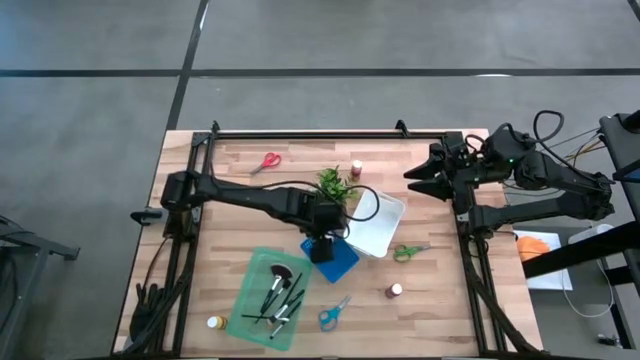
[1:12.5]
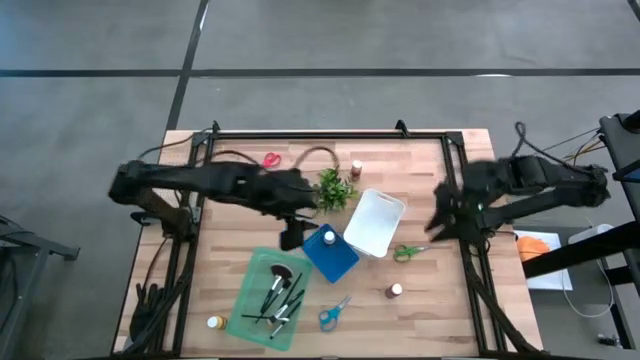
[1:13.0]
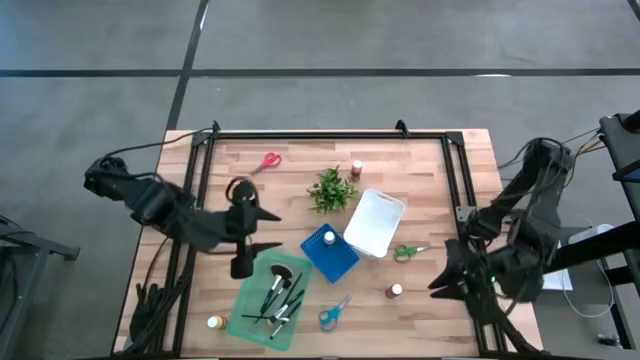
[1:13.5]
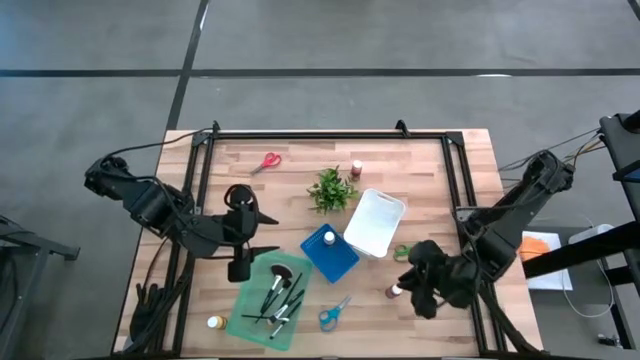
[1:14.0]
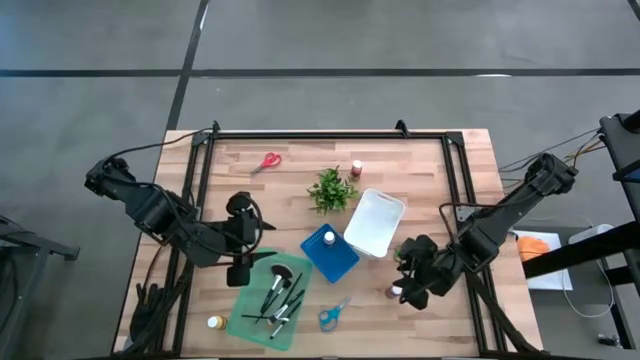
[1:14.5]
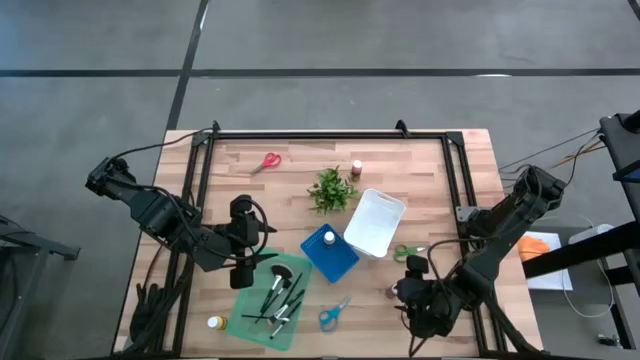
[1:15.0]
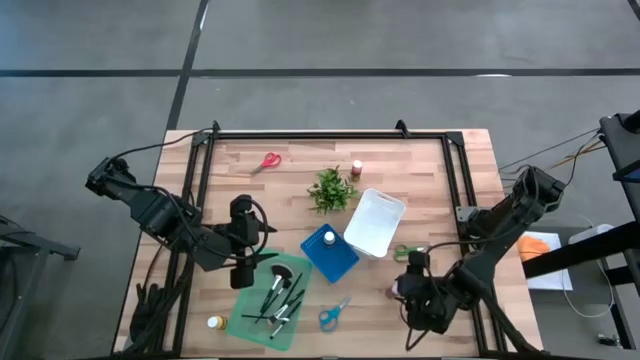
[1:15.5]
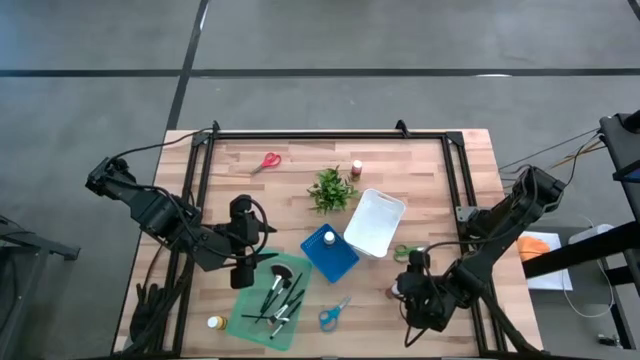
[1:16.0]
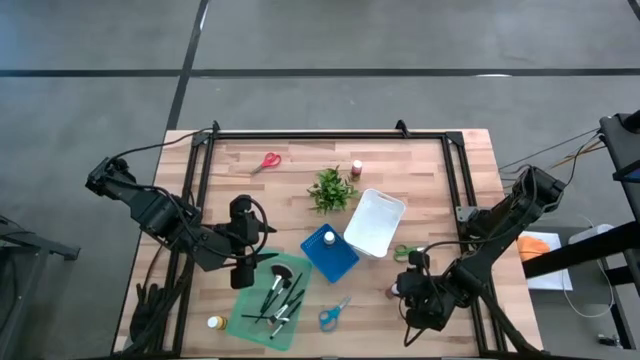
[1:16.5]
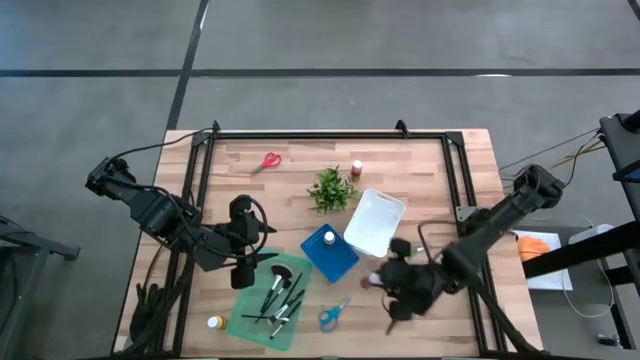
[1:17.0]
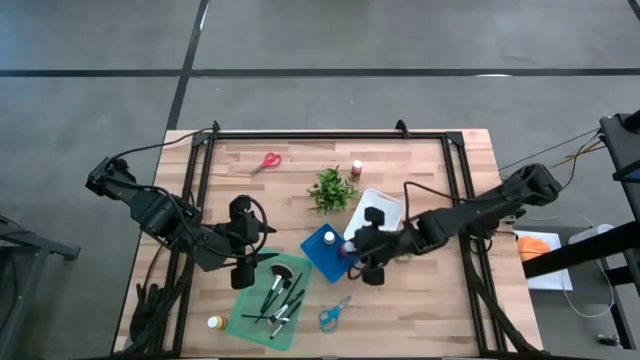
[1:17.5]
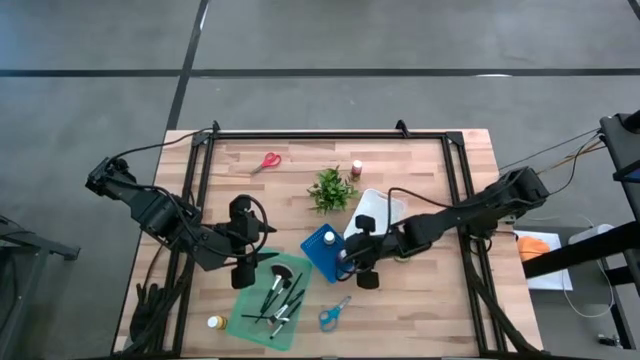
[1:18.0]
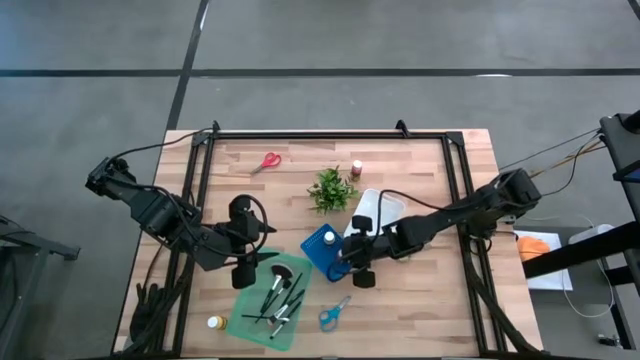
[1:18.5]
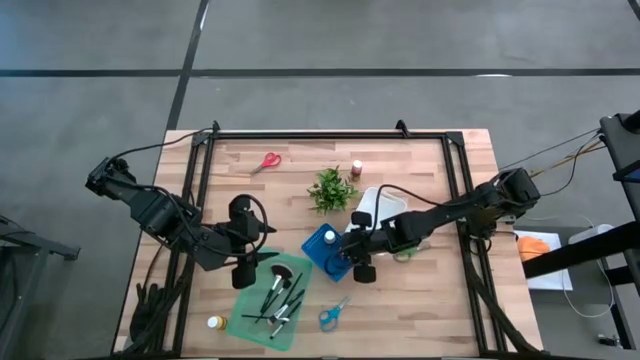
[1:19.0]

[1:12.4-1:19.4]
Task: Pick & Place Paint Supplies
Put the red paint bottle into the blue bin

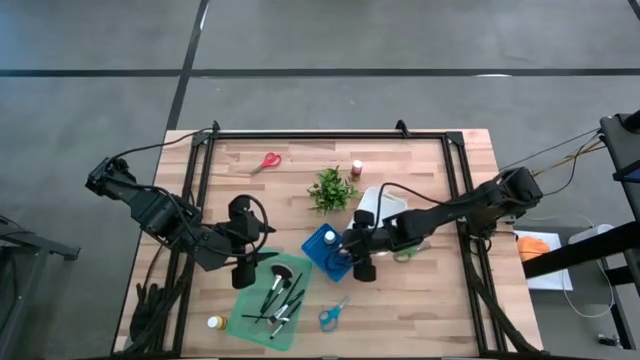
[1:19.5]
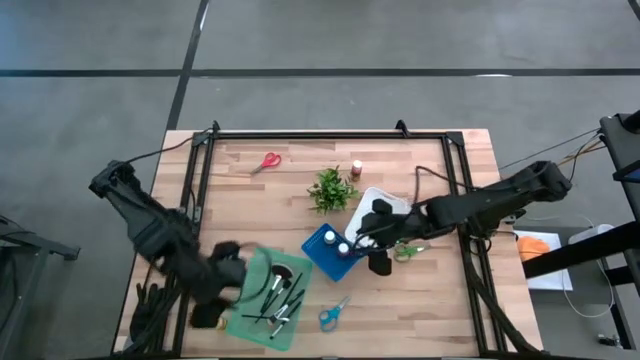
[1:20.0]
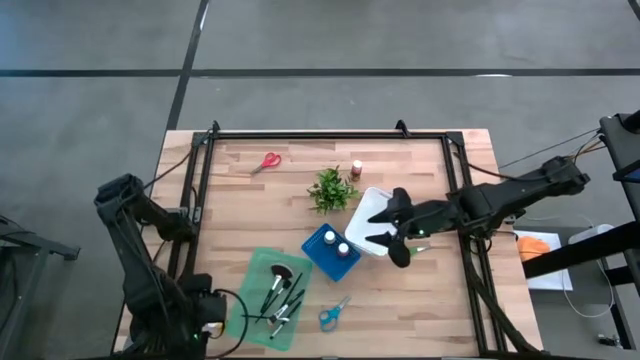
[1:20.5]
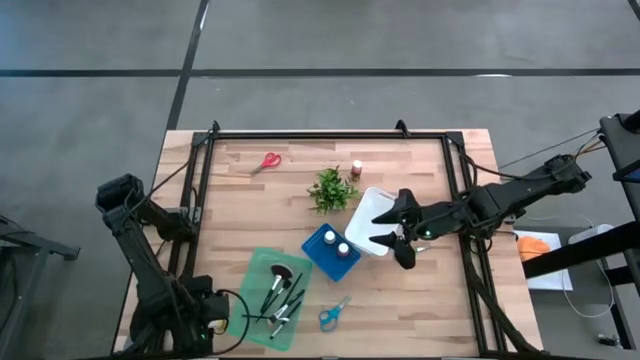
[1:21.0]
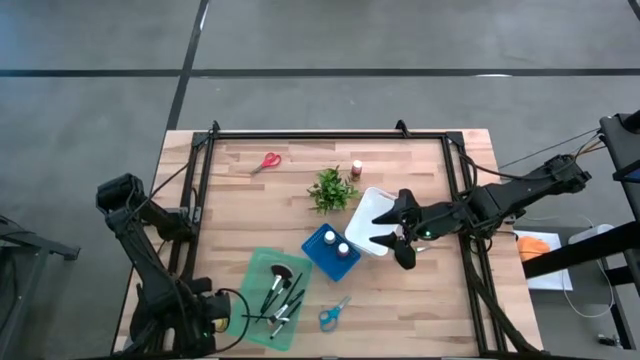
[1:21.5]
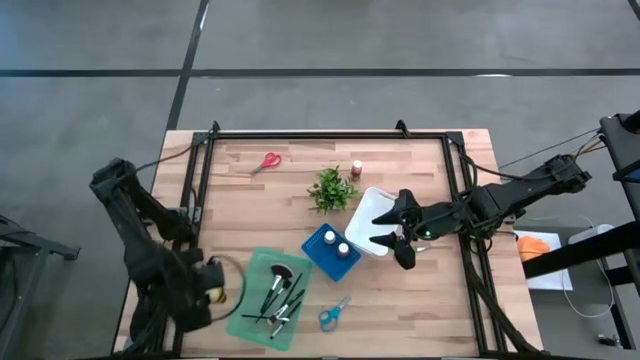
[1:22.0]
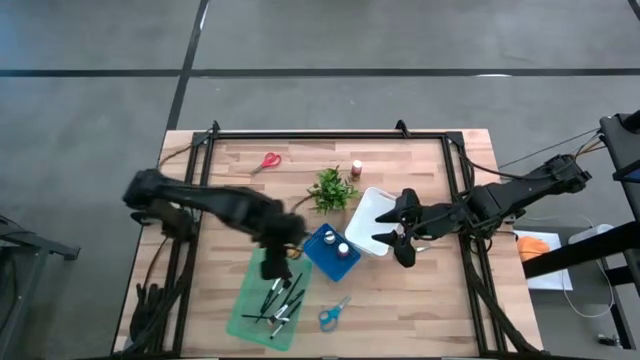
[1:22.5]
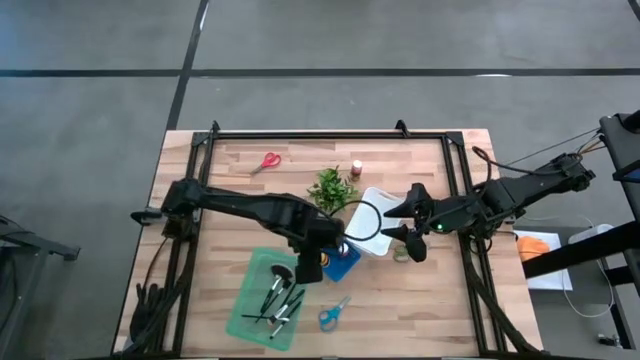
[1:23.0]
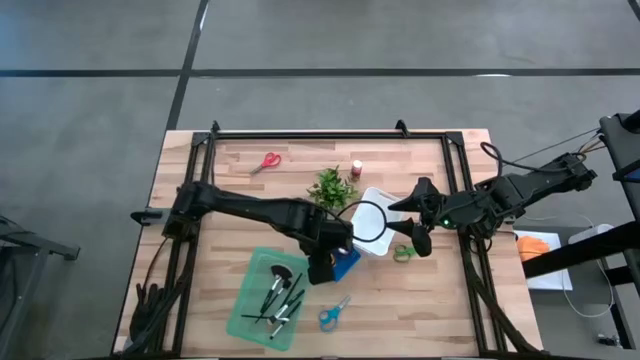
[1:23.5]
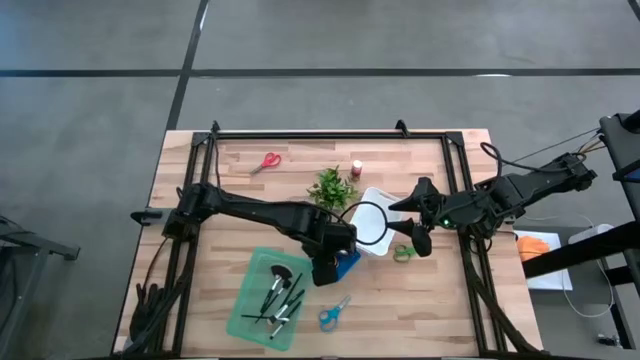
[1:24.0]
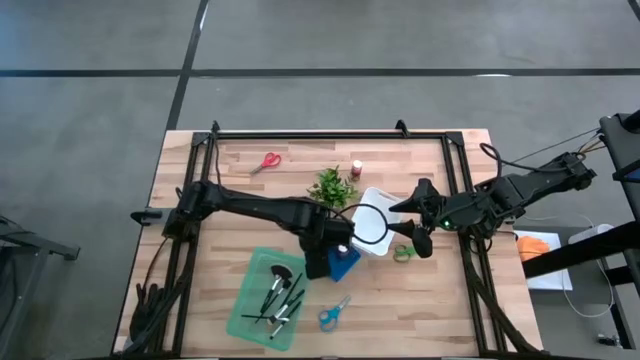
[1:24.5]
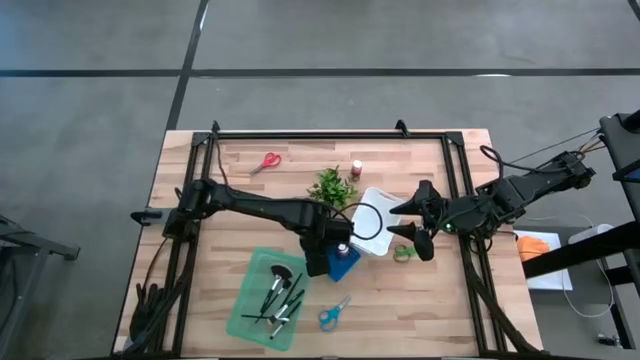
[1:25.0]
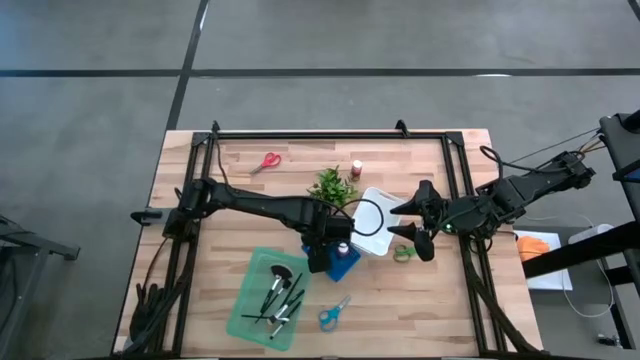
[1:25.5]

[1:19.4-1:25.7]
Put the yellow paint bottle into the blue bin

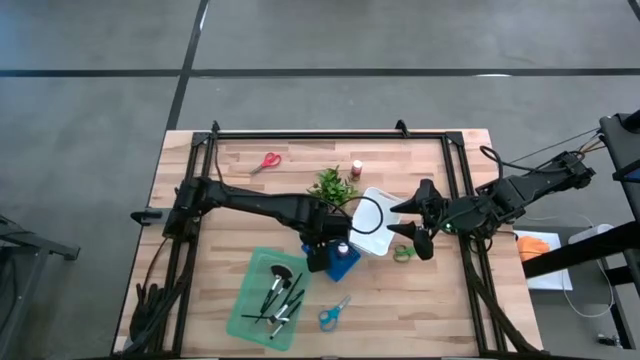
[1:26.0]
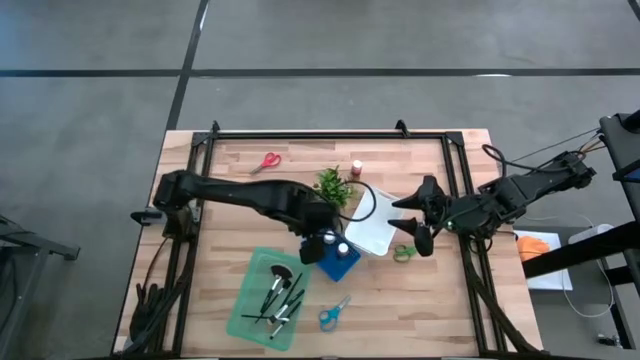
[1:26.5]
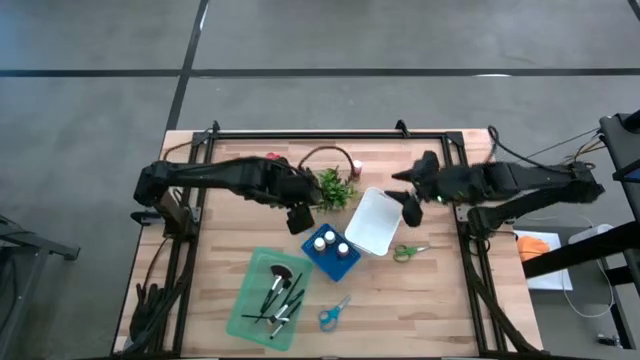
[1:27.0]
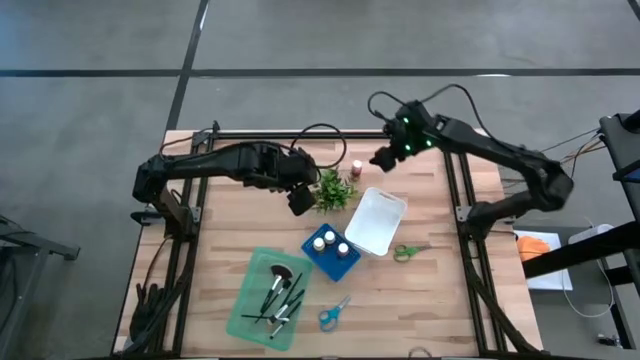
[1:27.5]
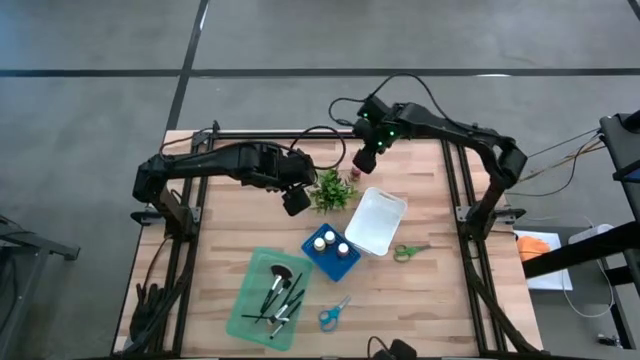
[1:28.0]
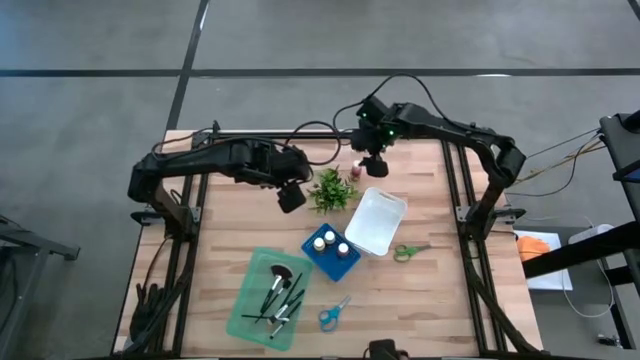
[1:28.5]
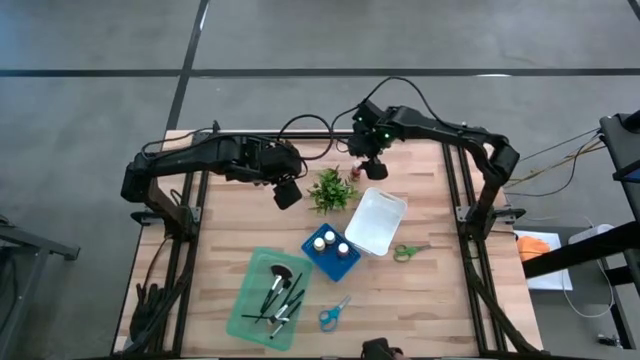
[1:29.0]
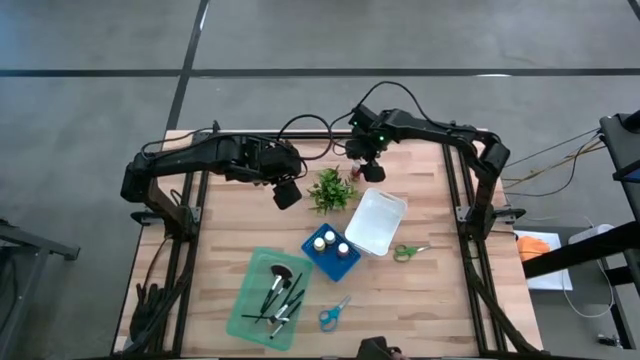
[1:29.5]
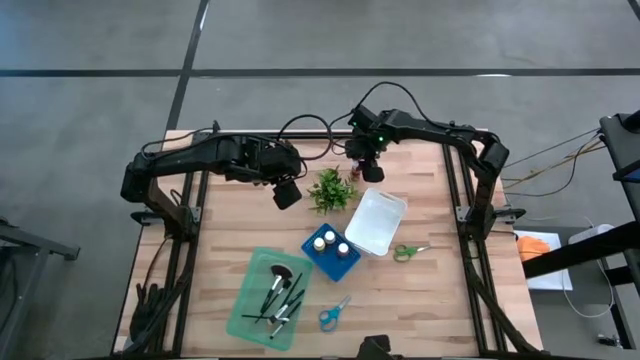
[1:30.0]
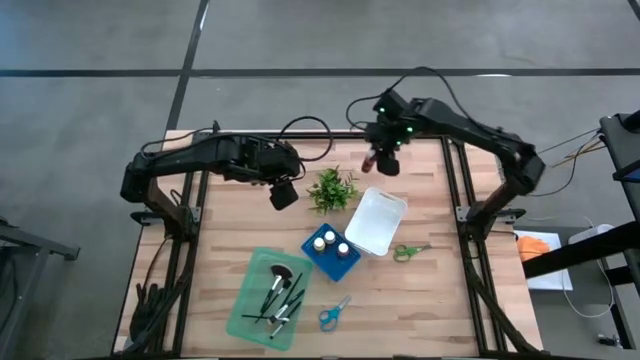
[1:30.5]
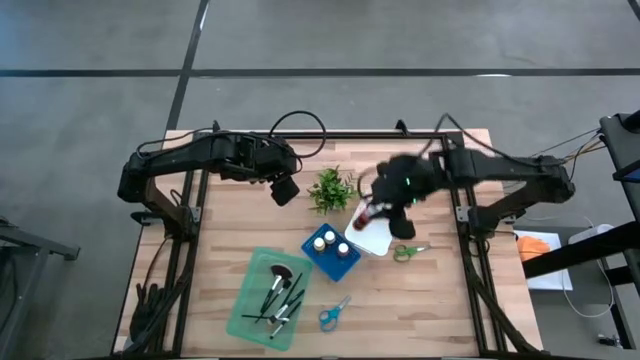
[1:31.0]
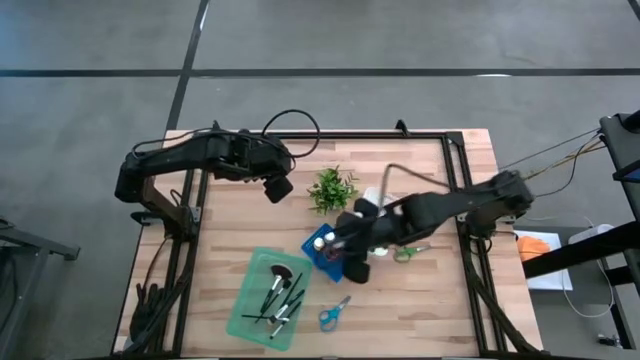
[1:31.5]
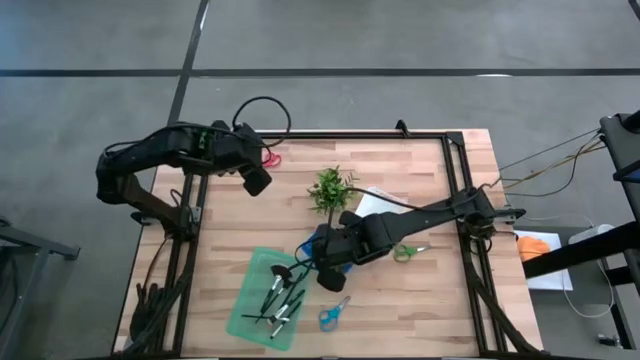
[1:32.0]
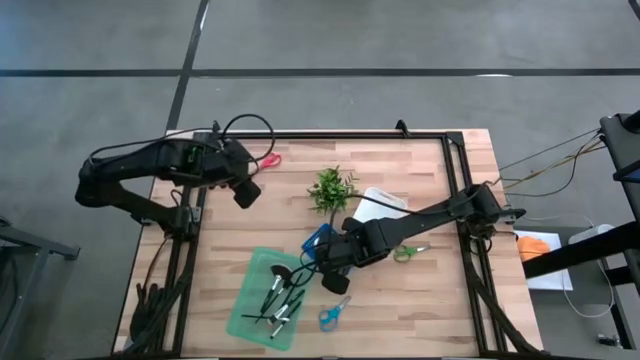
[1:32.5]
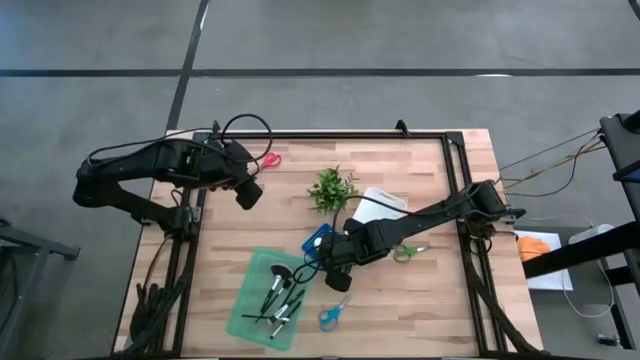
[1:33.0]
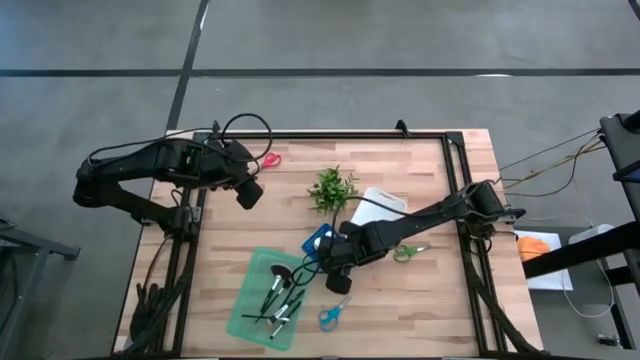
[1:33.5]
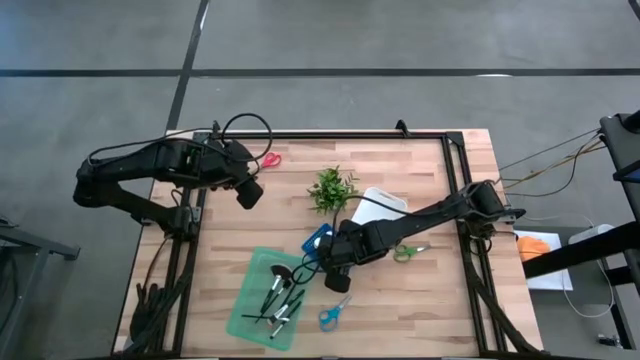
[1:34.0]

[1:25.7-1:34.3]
Put the orange paint bottle into the blue bin
